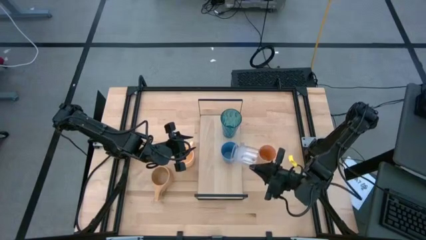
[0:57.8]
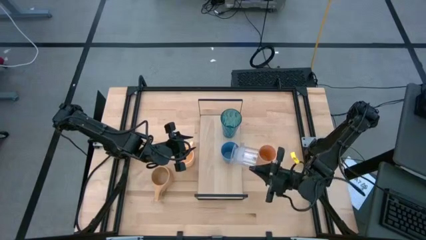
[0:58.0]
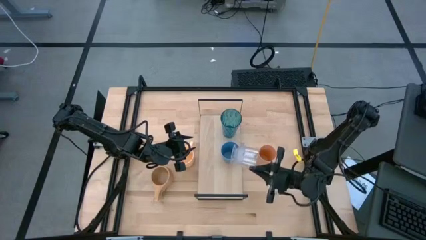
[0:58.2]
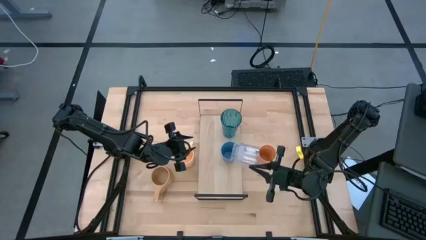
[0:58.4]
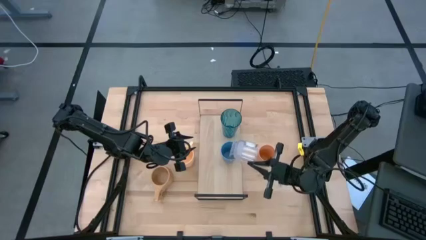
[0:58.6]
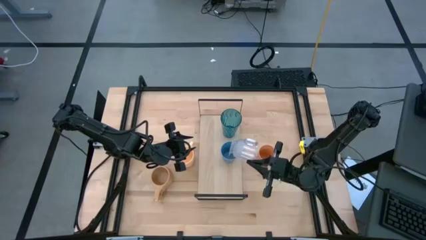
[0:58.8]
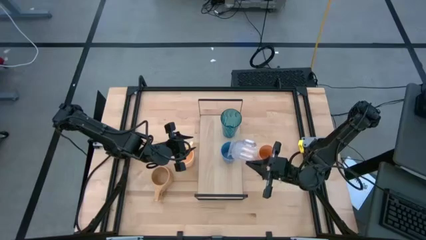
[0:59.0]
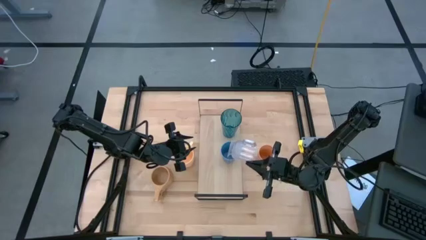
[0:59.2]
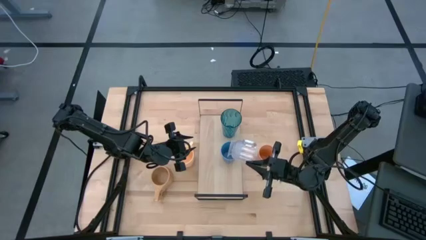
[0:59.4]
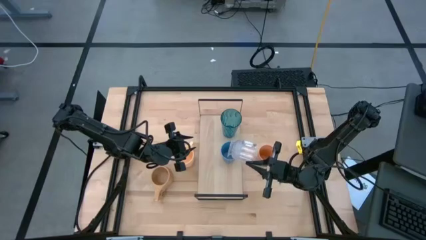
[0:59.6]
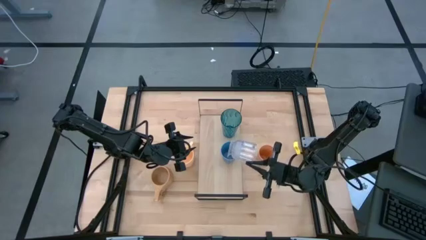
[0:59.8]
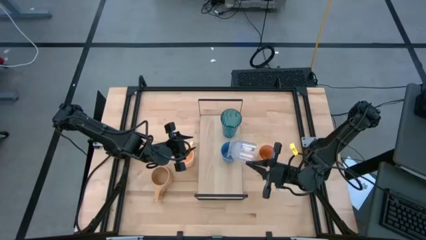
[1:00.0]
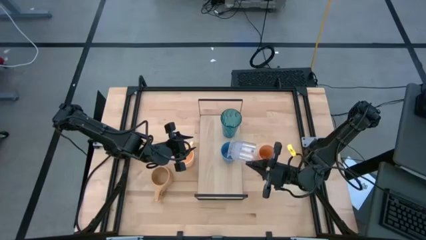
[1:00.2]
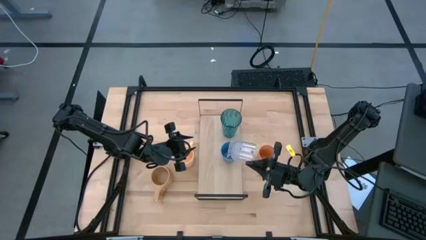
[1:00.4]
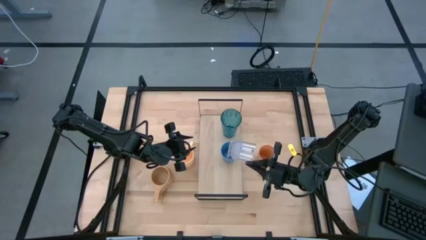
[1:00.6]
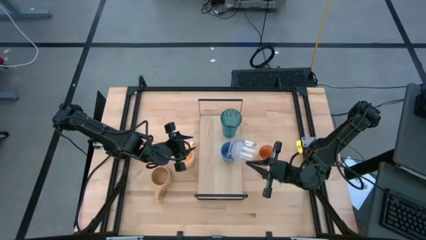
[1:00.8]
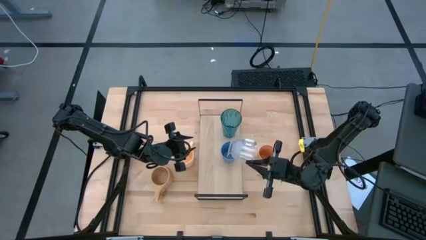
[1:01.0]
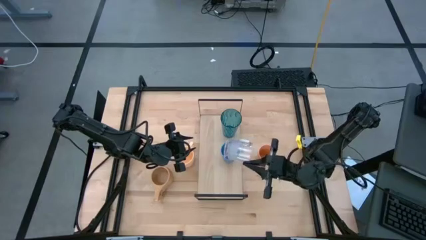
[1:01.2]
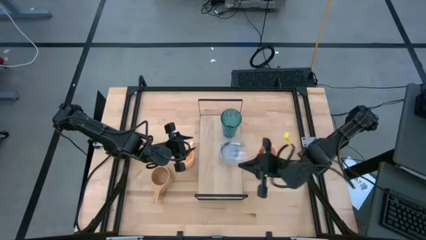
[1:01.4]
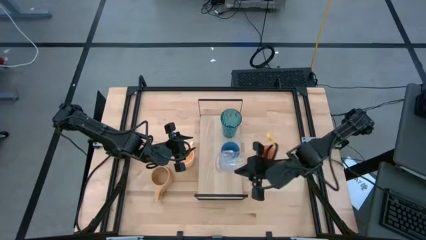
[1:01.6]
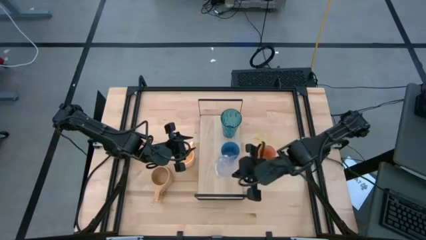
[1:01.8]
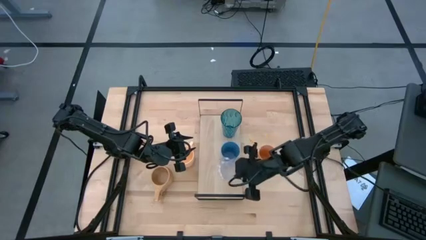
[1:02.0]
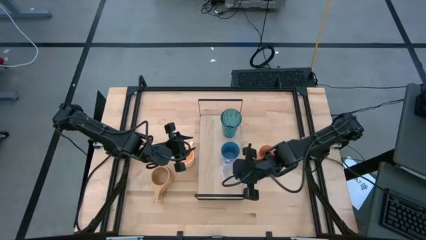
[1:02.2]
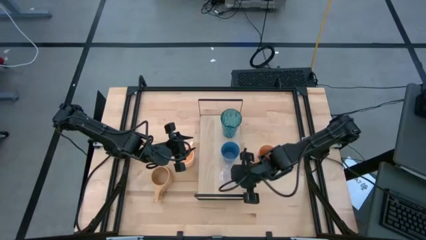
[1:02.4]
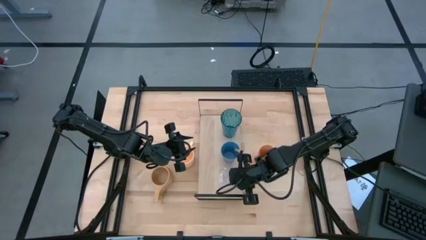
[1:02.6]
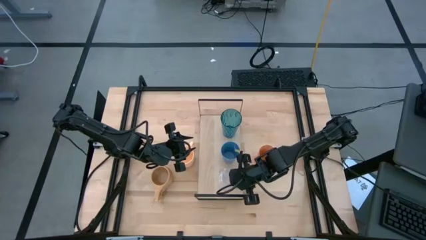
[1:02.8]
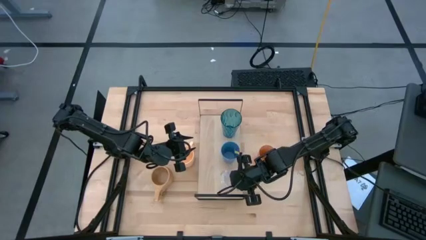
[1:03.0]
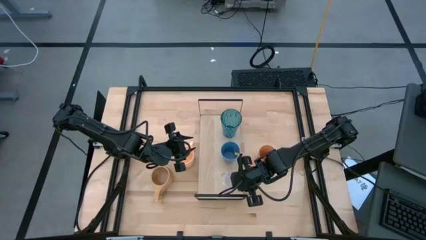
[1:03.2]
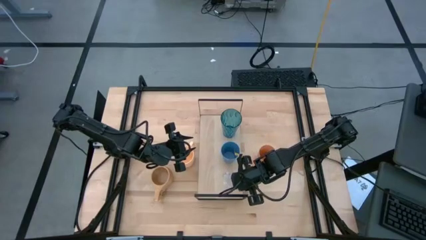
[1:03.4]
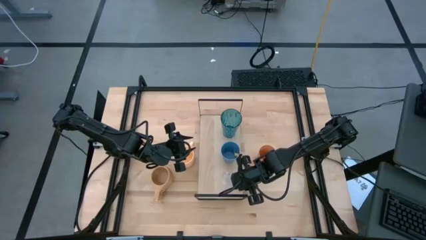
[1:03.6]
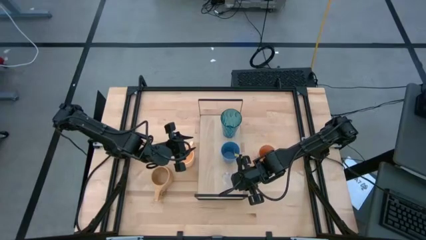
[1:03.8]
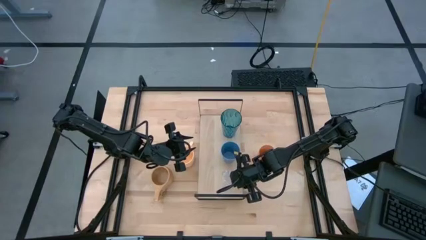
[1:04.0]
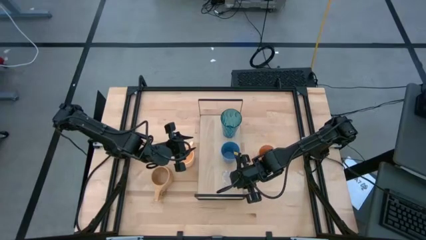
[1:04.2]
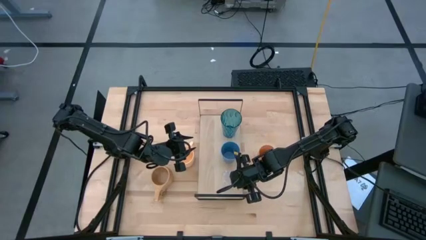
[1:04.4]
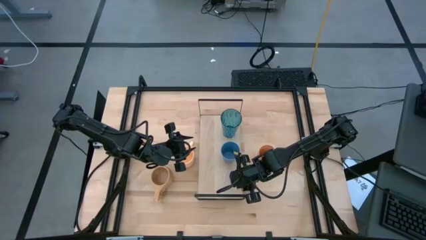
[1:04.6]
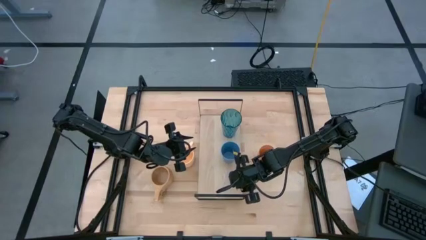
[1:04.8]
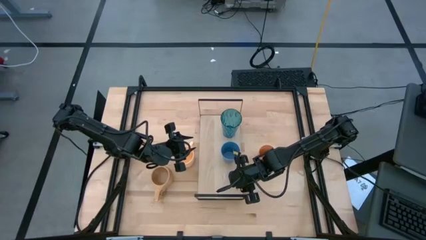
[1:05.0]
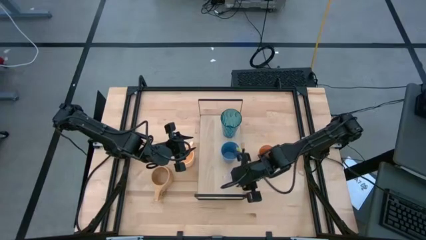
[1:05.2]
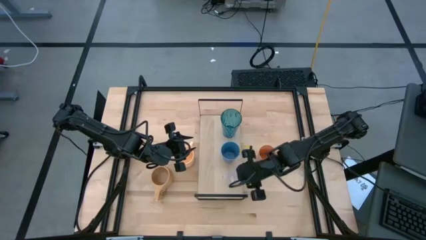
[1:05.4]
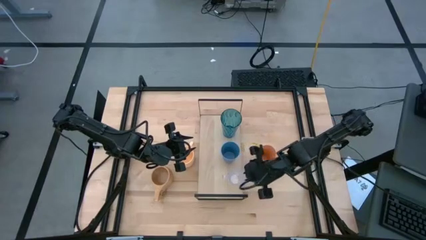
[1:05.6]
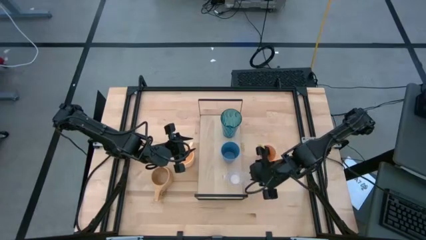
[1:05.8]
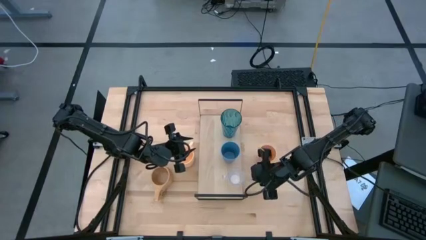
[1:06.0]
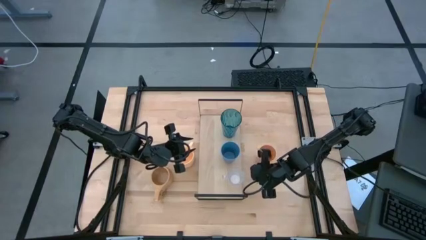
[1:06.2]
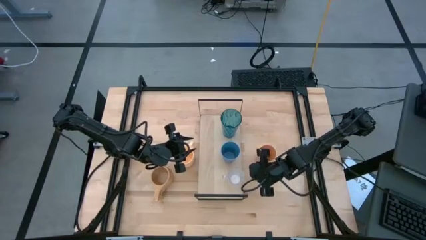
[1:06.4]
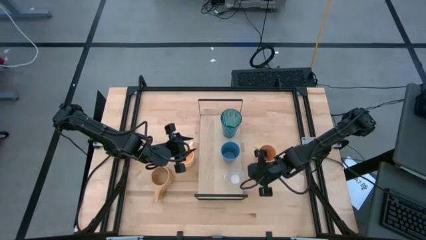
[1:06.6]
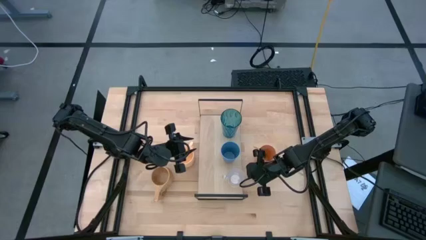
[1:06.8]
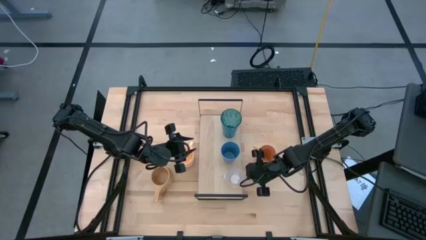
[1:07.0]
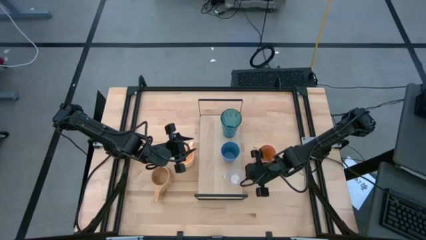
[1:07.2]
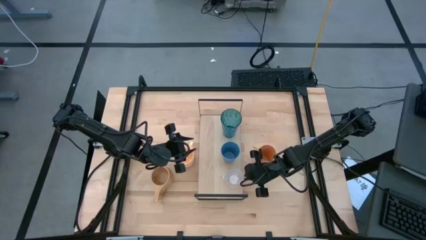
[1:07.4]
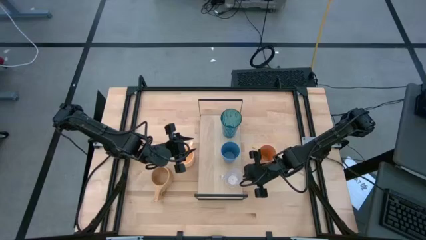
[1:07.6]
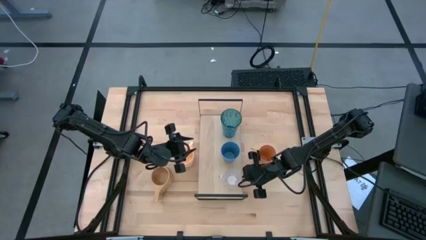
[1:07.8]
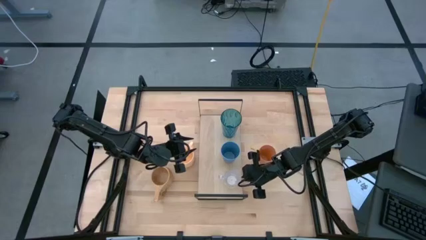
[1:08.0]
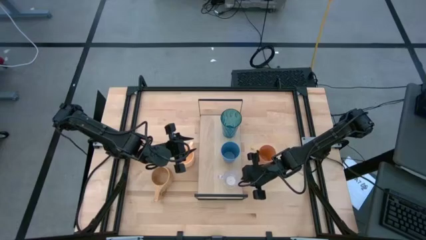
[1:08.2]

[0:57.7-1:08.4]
Task: Stack small to large cups/mugs on shelf
Put the transparent mug on the shelf

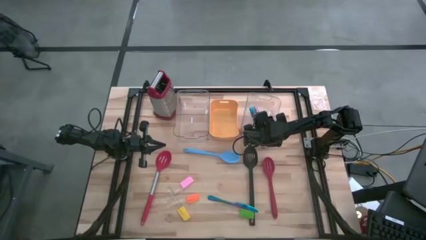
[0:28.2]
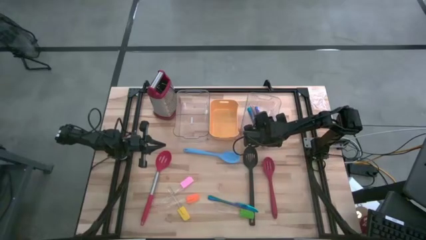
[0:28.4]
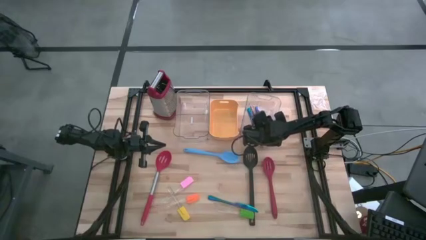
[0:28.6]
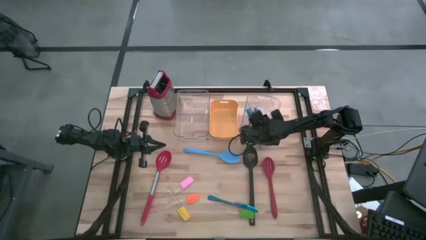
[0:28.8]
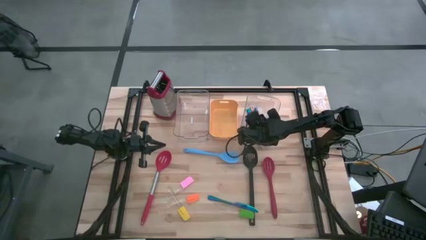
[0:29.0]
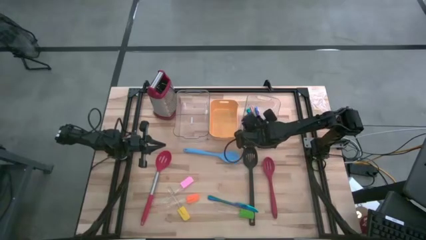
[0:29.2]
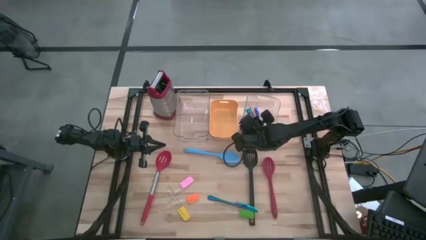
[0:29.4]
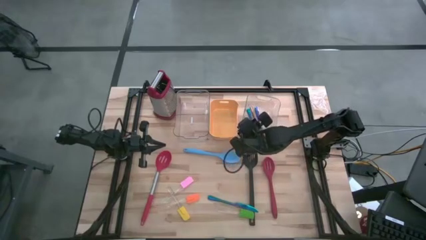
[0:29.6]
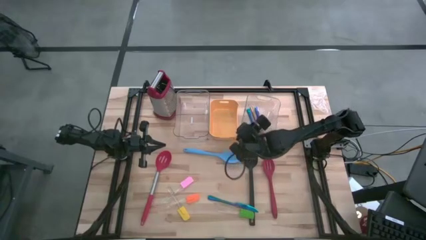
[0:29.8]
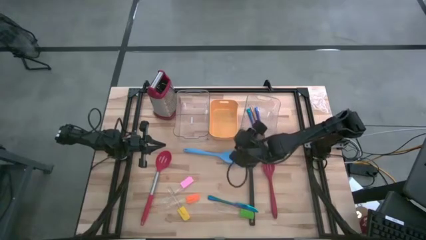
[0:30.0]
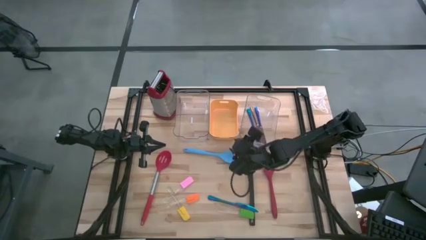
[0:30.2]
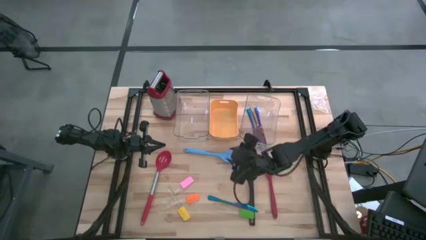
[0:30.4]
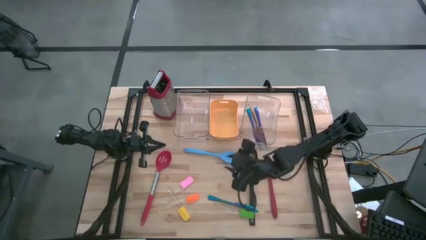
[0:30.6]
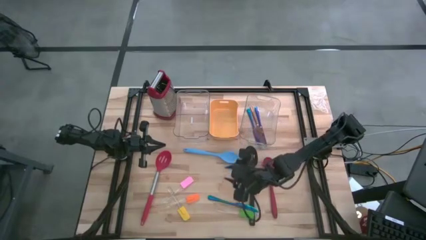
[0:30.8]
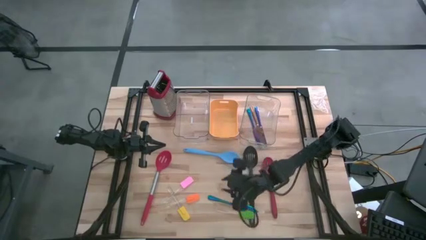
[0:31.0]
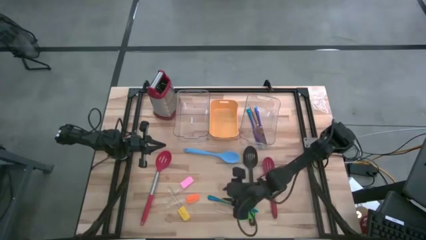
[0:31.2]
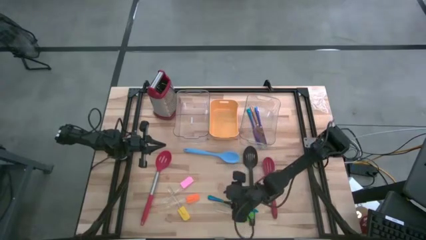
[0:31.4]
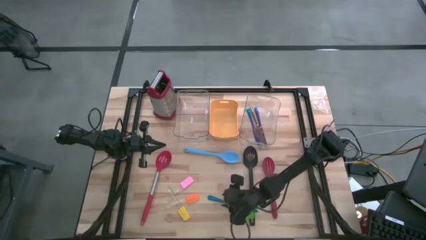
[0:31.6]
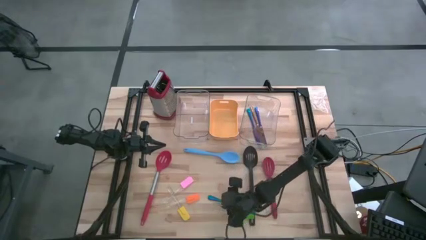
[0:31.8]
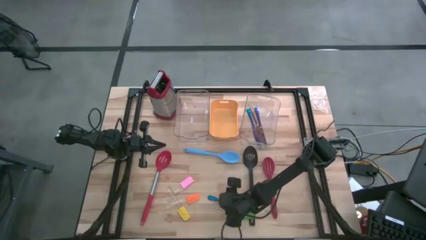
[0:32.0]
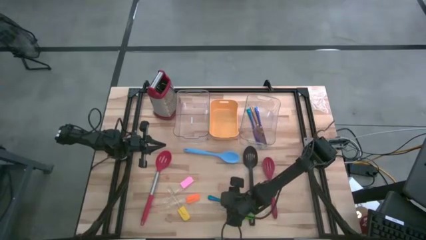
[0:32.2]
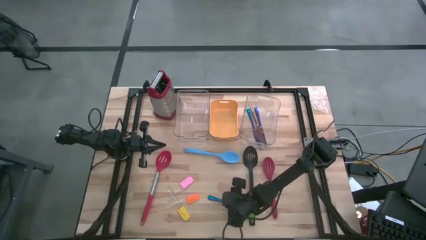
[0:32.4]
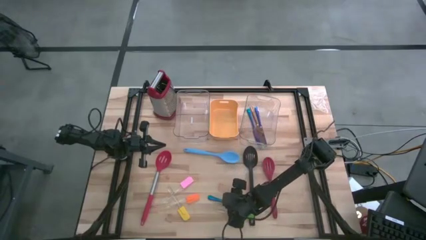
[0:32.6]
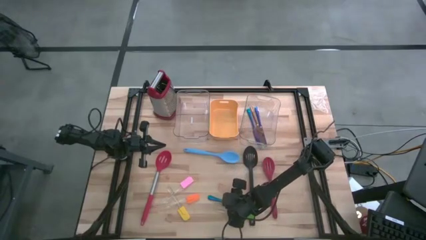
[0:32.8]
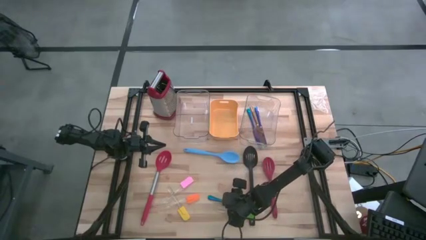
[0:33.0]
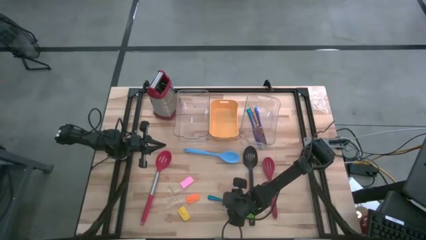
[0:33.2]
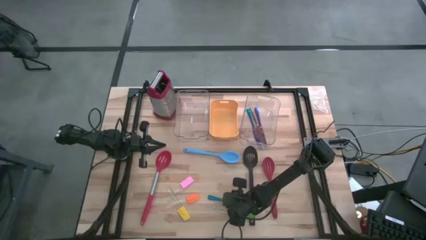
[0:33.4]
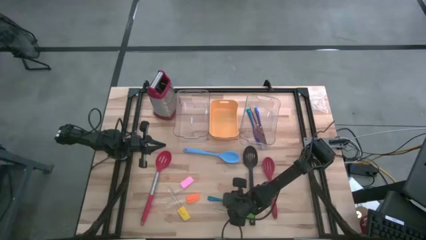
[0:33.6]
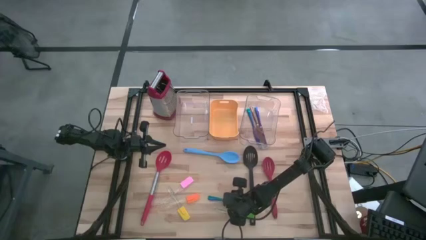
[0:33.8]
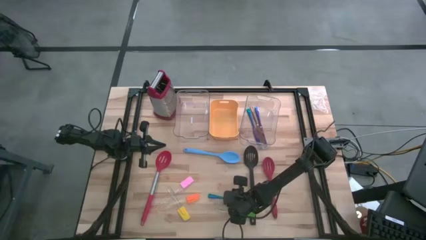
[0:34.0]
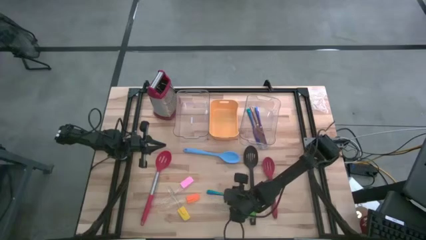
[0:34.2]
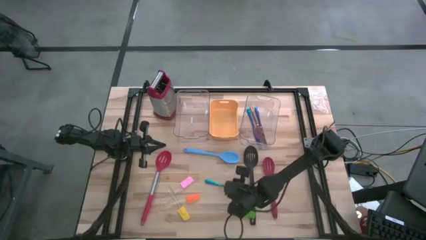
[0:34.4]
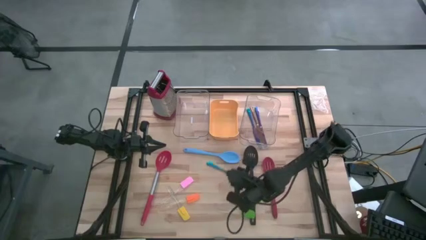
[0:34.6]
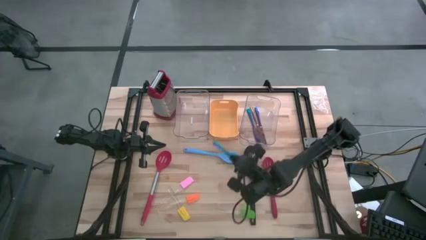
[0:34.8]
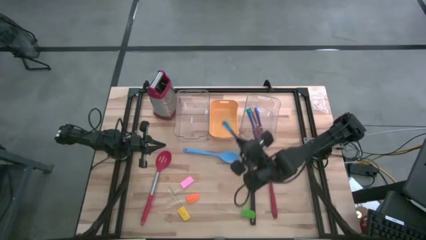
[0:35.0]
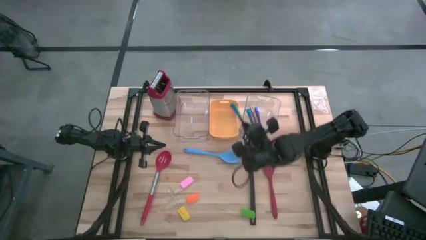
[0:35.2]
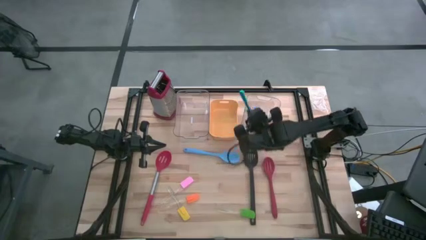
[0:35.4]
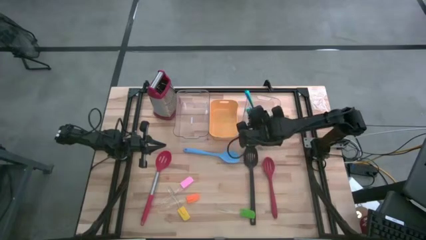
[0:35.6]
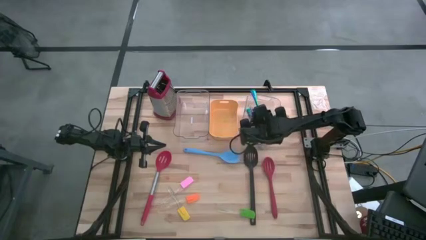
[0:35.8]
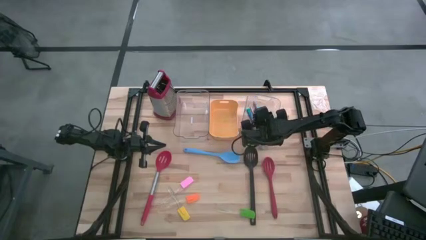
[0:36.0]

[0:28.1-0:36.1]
Task: Pick & Place Kitchen Items
Put the blue knife into the right transparent bin
